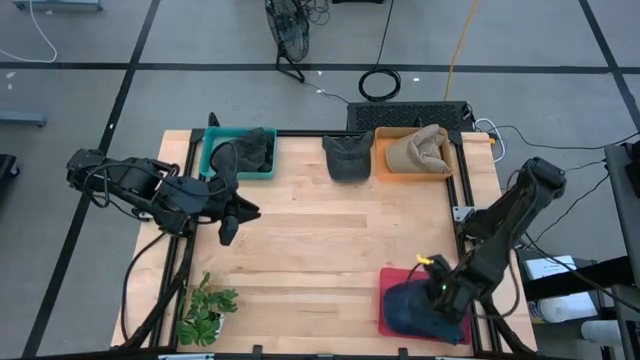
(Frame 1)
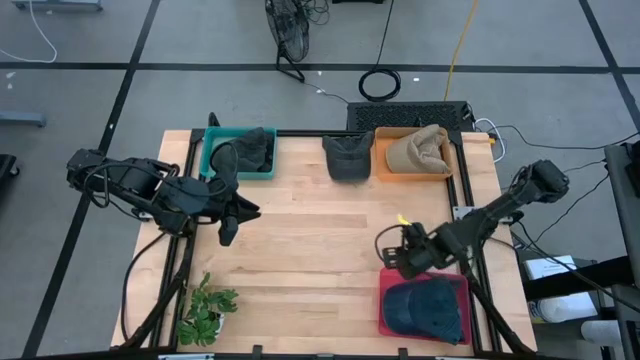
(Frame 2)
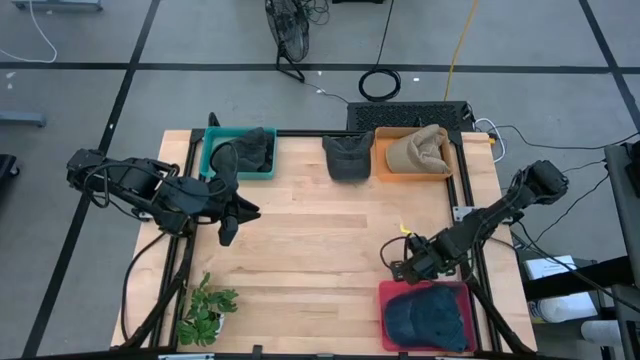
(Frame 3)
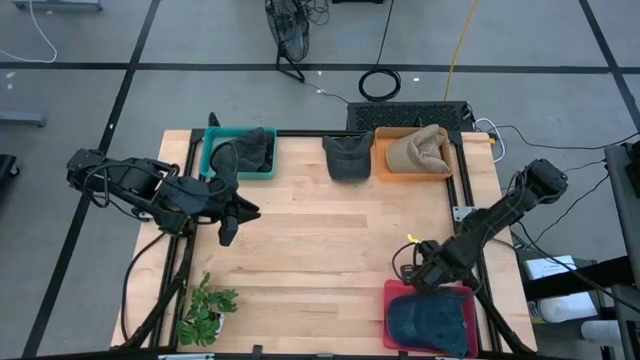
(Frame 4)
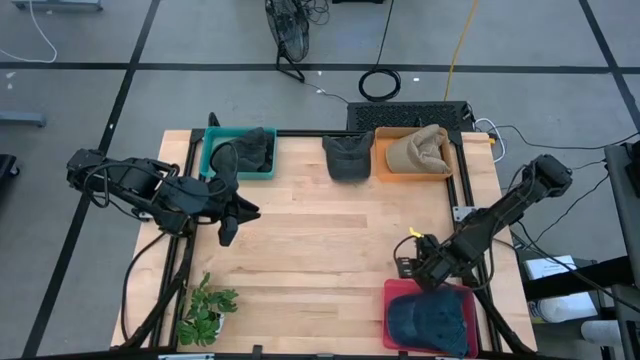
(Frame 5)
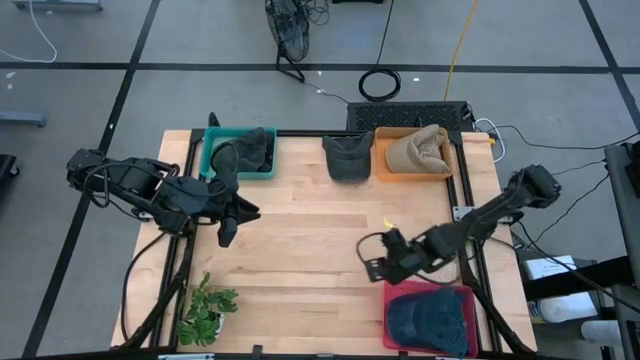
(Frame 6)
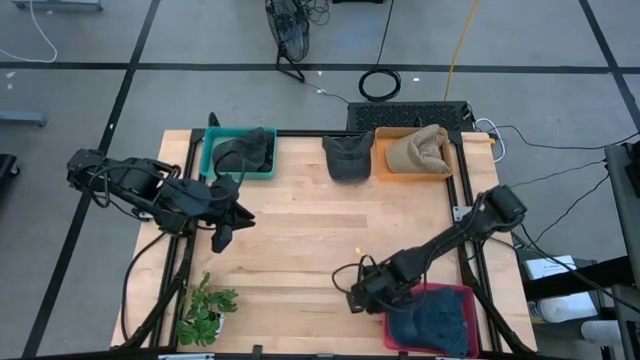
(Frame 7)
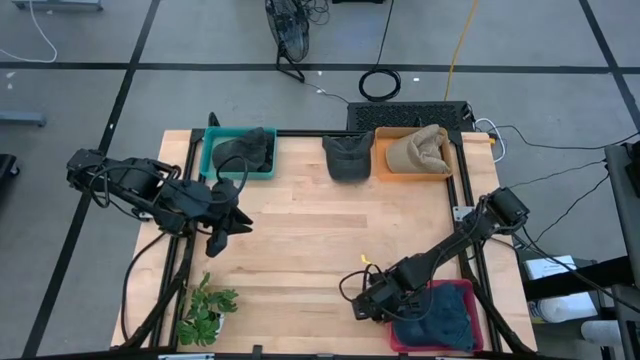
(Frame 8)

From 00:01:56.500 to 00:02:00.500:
Task: Pick & Place hat
Adjust the red bin

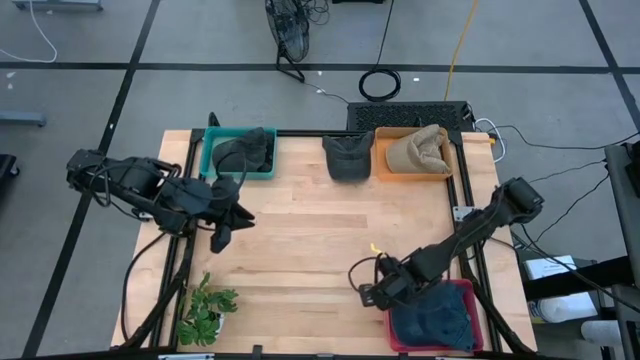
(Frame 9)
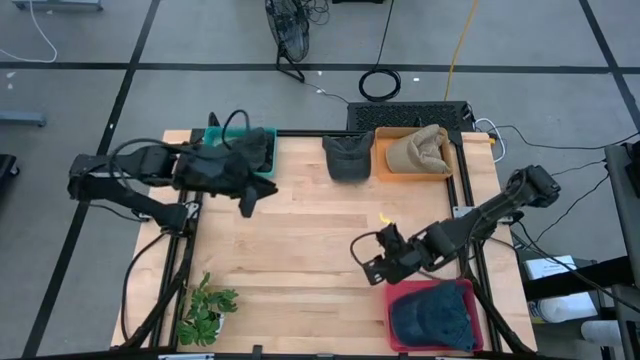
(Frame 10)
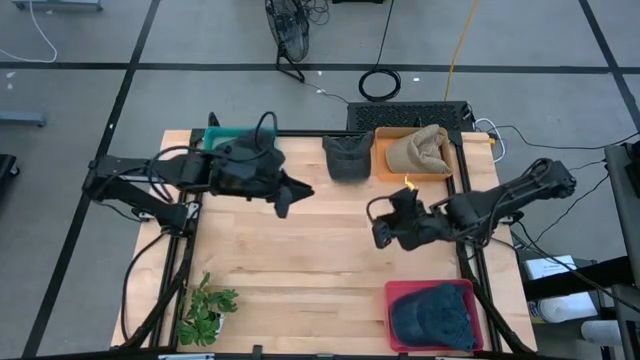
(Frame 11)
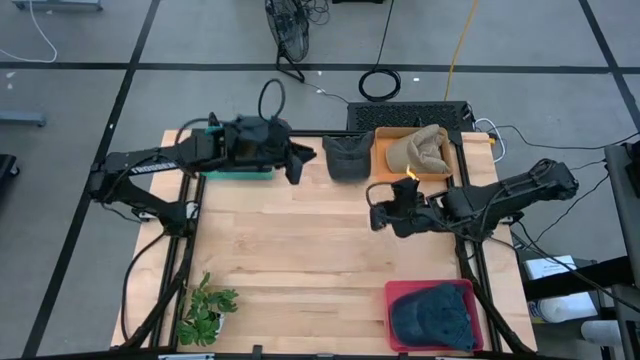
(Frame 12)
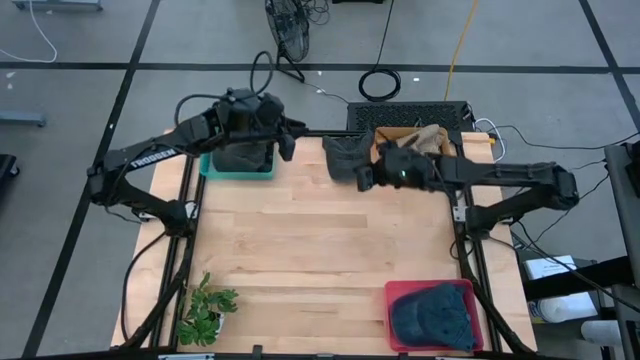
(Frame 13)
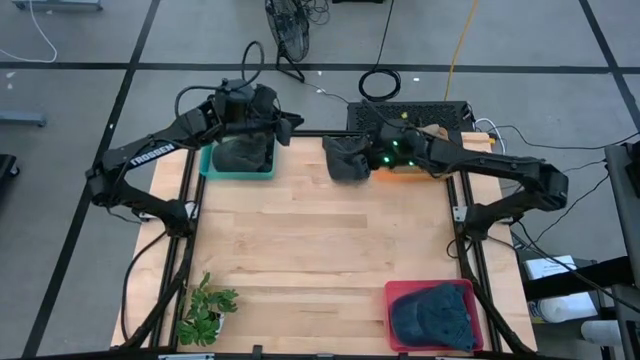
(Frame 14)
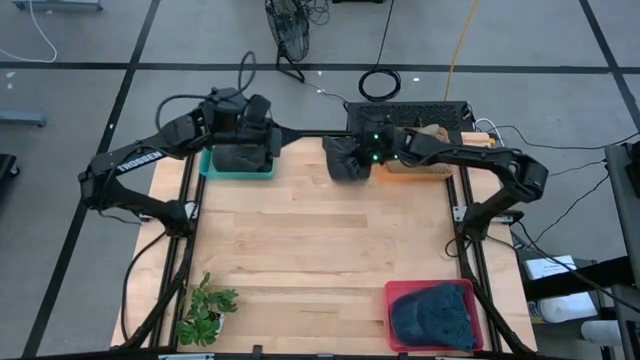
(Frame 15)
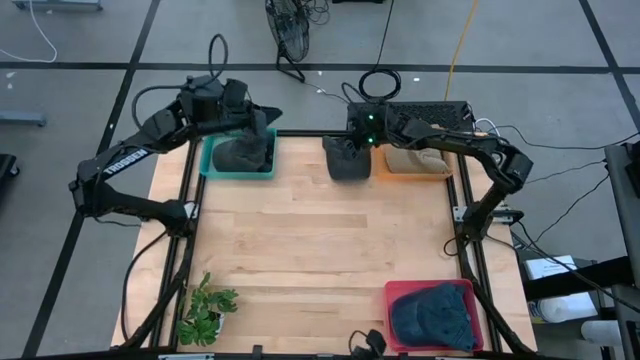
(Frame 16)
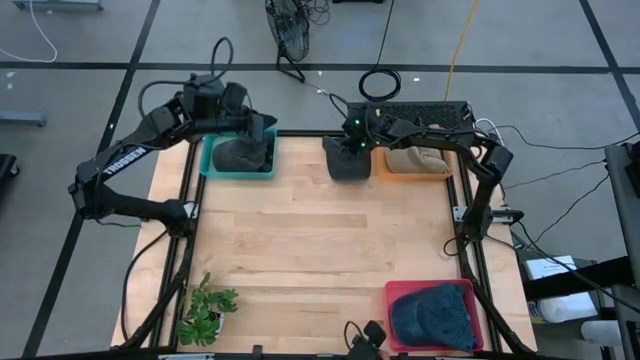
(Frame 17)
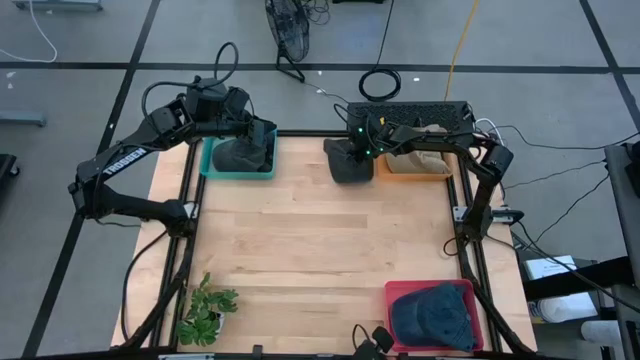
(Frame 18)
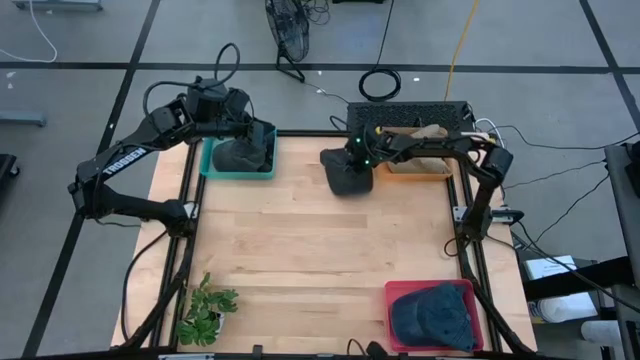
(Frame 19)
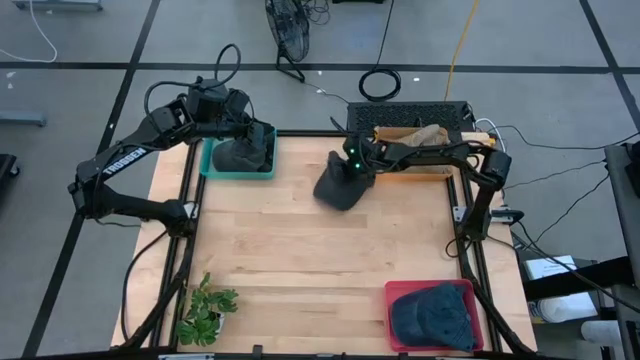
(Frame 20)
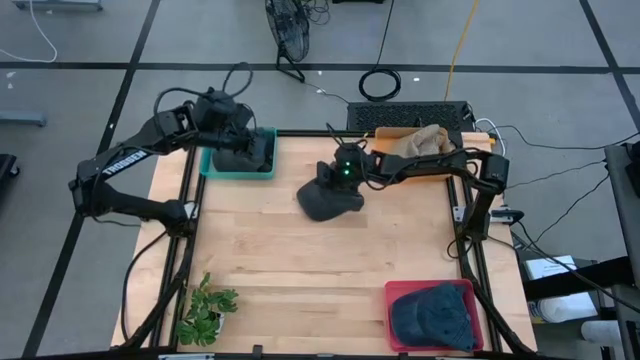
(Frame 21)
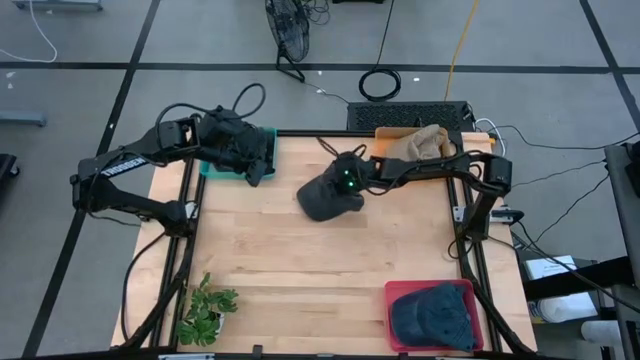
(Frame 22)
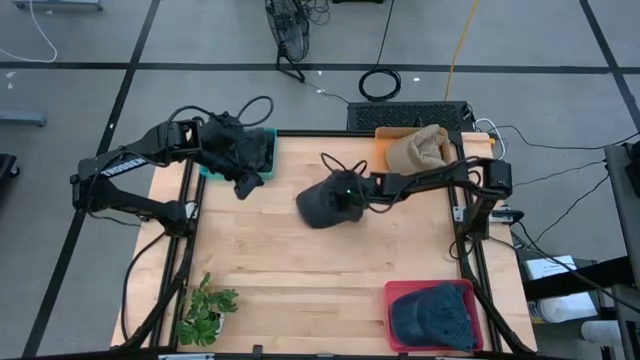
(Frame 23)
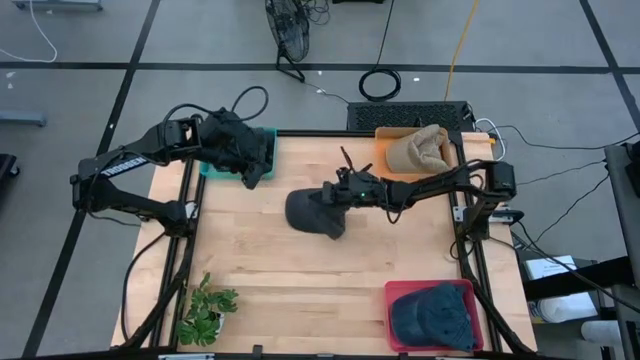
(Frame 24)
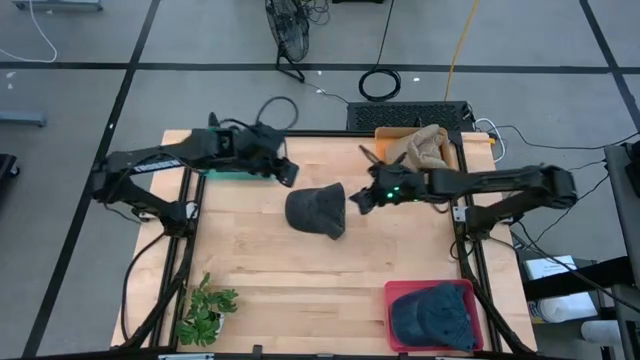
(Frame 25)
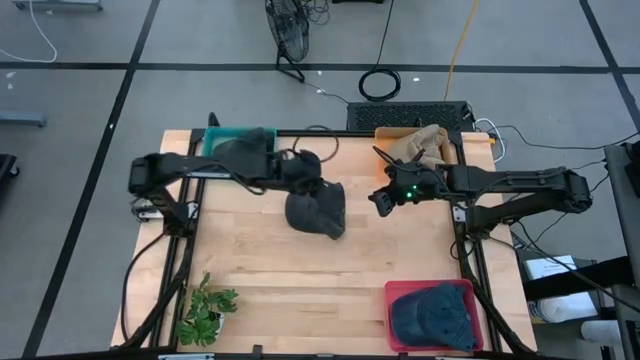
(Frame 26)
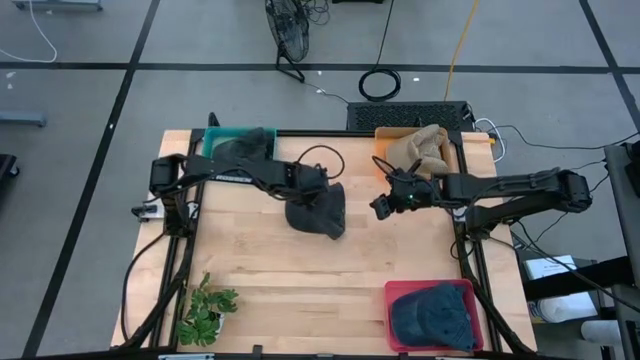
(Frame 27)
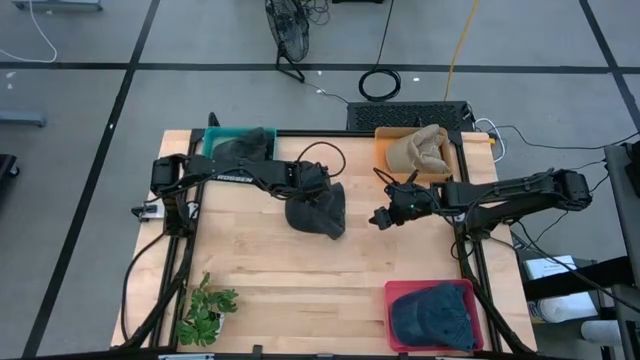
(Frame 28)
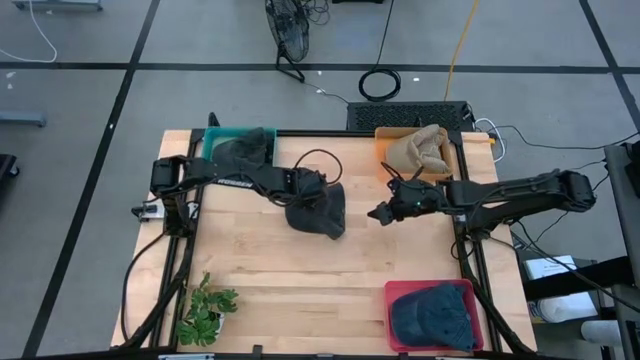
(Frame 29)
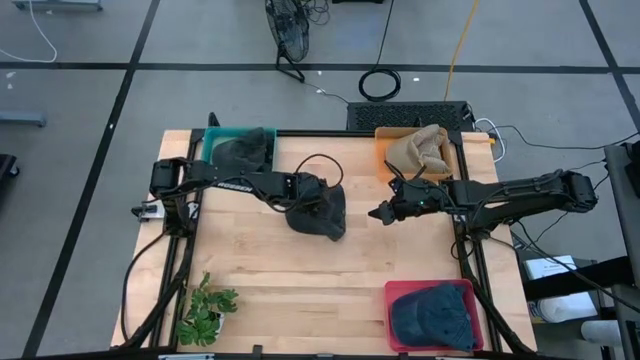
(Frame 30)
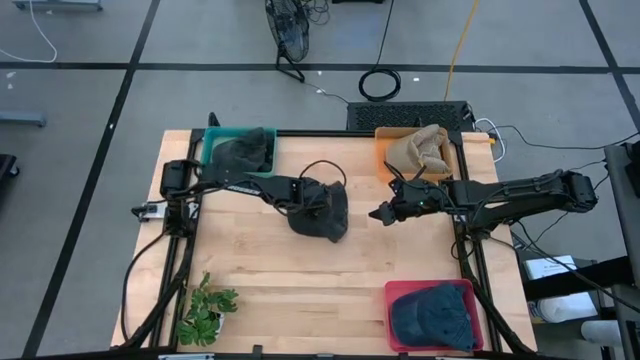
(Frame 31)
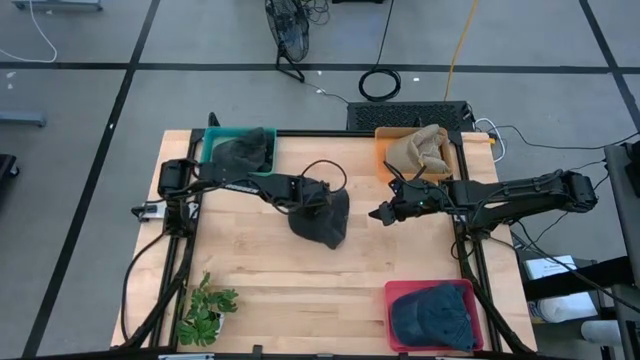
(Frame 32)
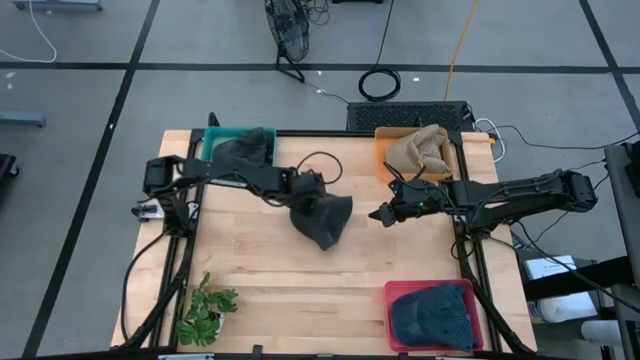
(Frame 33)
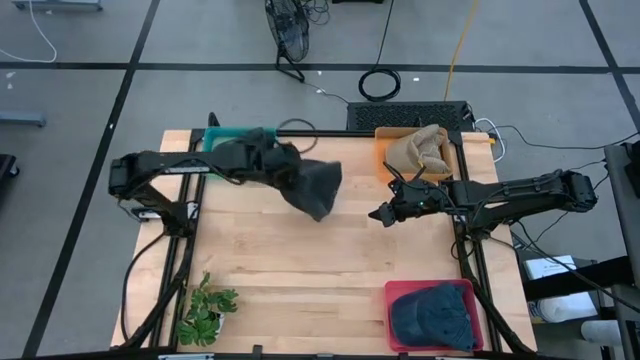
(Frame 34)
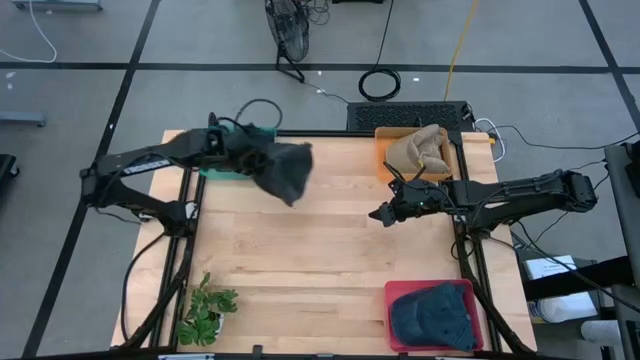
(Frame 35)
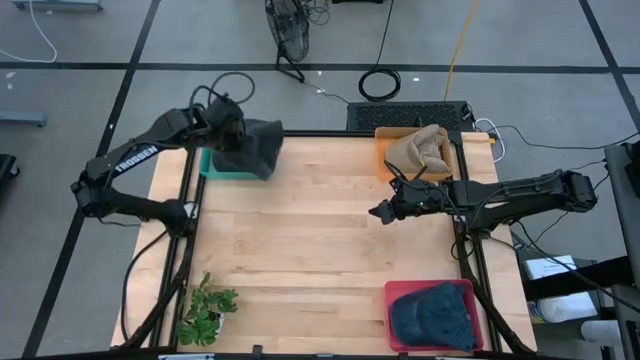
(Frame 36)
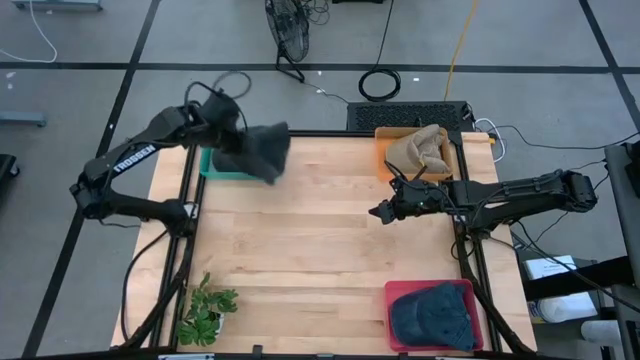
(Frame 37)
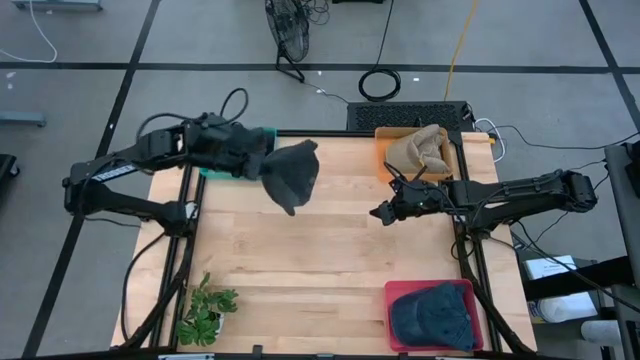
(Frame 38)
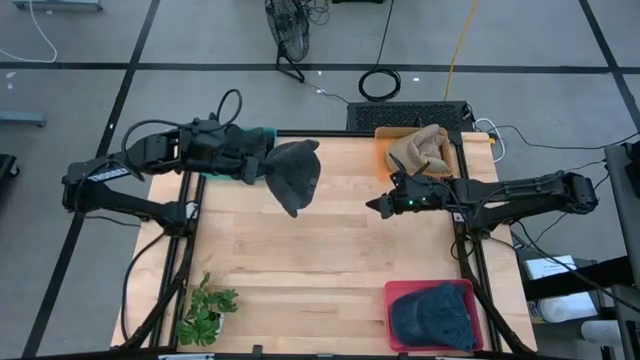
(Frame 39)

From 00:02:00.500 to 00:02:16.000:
Put the black cap into the green bin

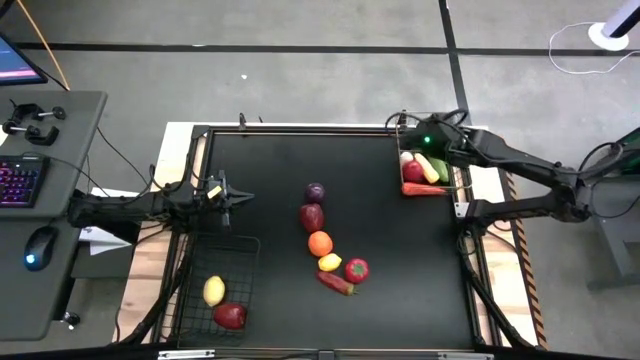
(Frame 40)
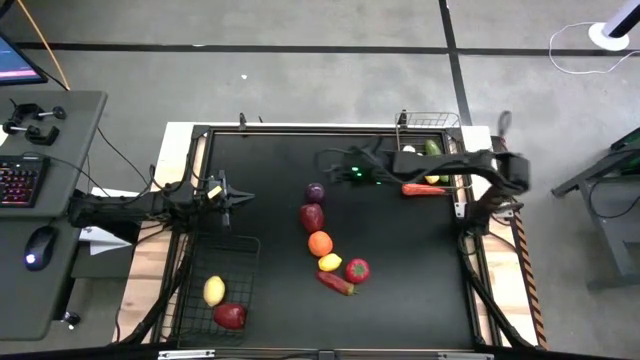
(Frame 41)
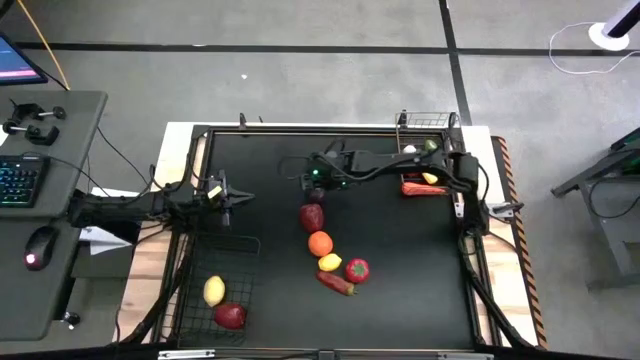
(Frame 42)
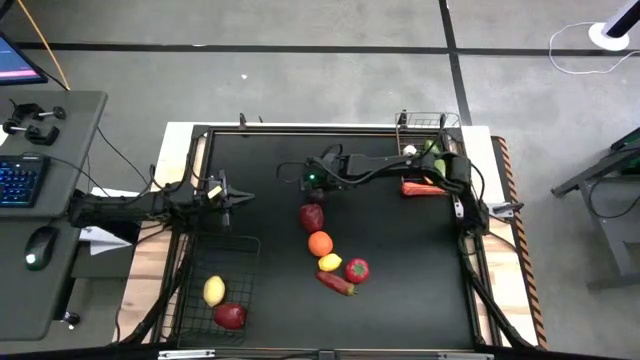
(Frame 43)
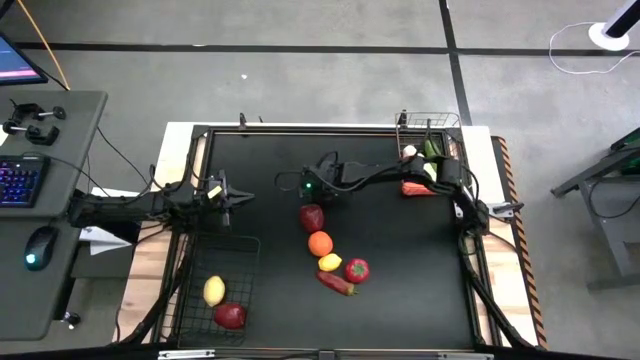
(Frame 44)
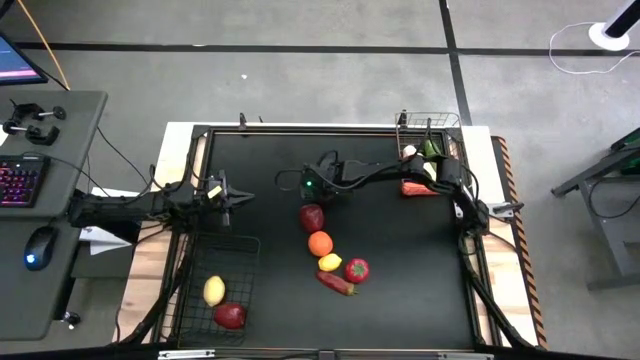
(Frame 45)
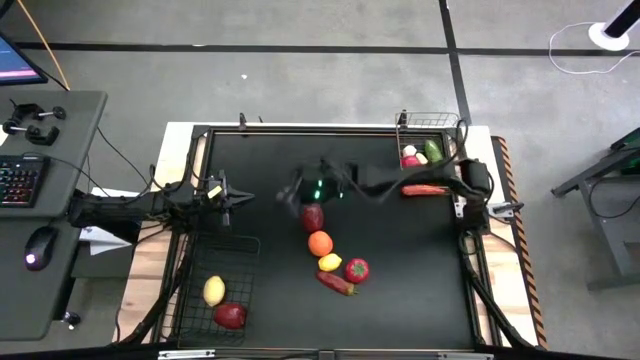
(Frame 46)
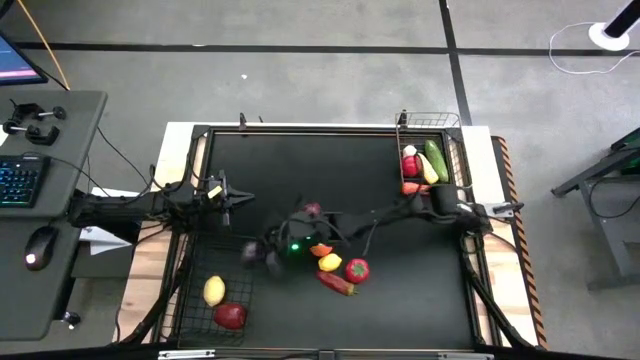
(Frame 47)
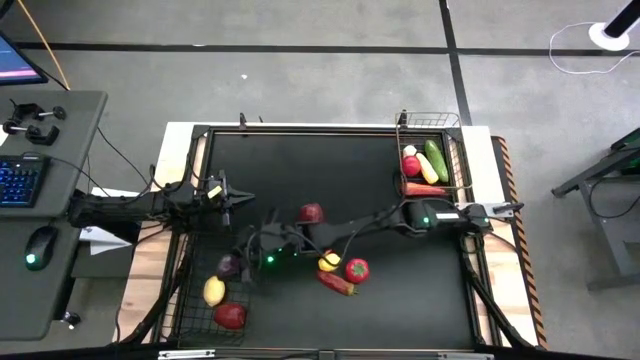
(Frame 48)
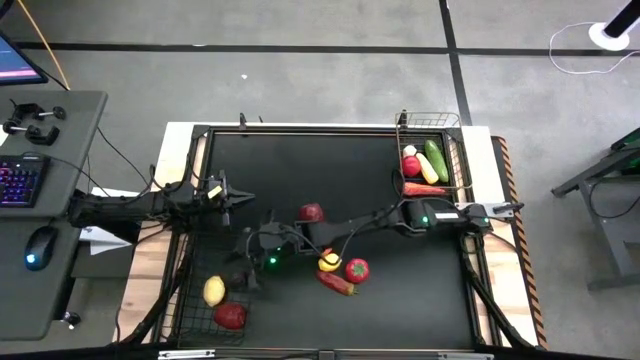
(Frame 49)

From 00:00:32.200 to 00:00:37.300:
Task: Sort produce into baskets
Put the onion into the left wire basket
